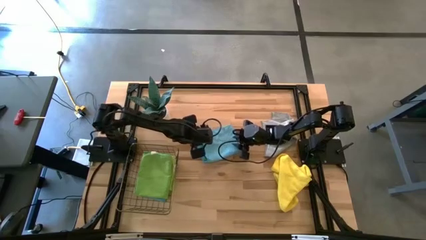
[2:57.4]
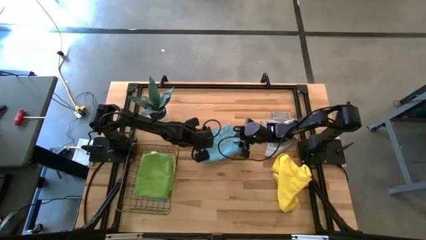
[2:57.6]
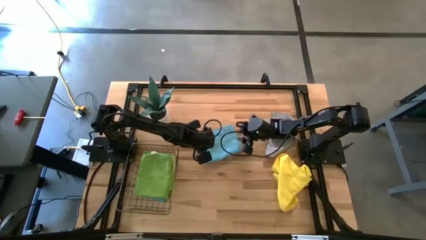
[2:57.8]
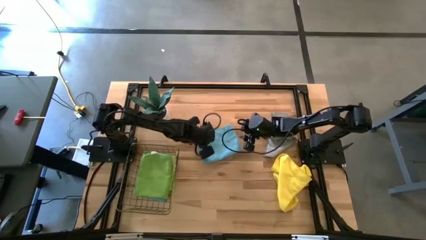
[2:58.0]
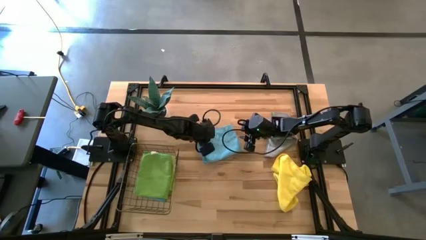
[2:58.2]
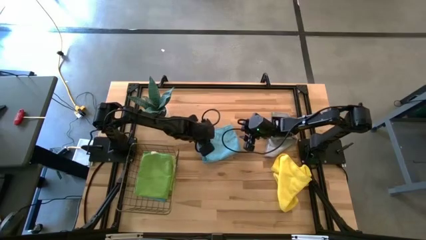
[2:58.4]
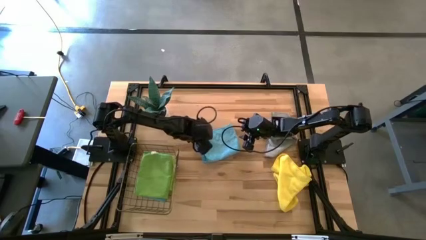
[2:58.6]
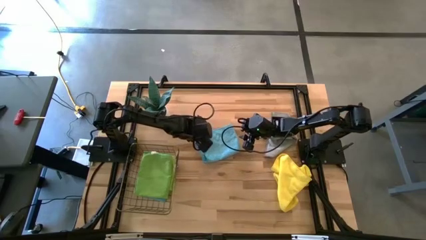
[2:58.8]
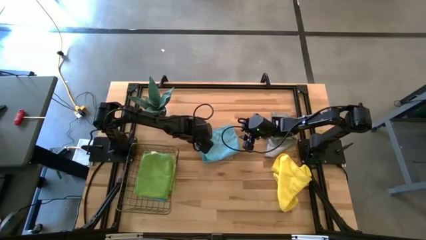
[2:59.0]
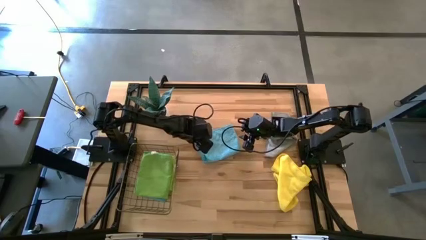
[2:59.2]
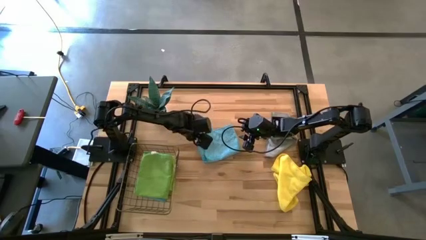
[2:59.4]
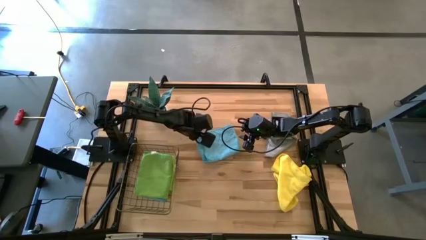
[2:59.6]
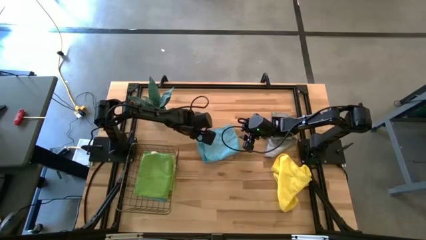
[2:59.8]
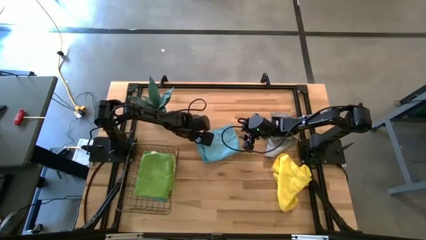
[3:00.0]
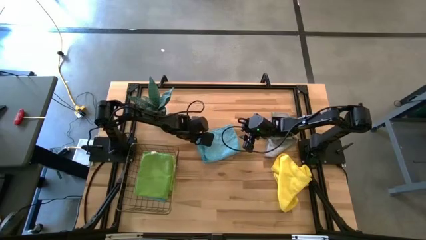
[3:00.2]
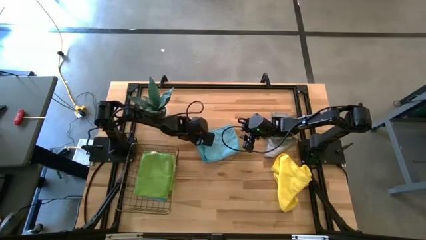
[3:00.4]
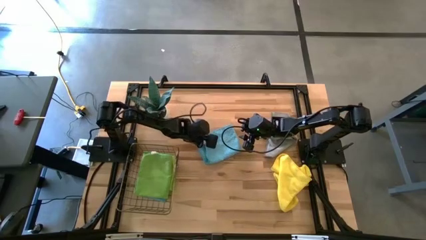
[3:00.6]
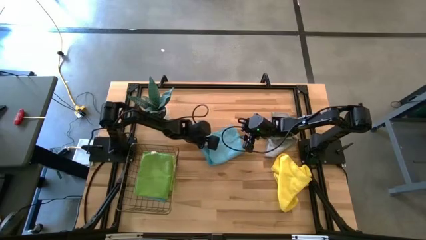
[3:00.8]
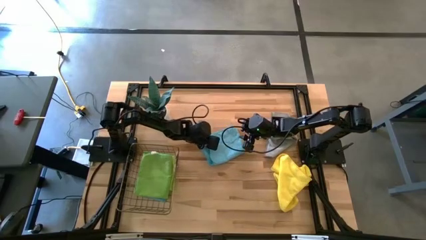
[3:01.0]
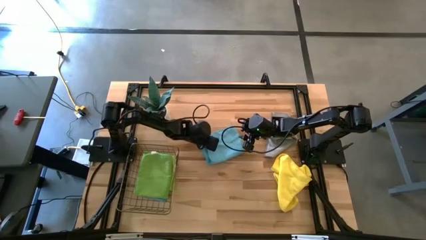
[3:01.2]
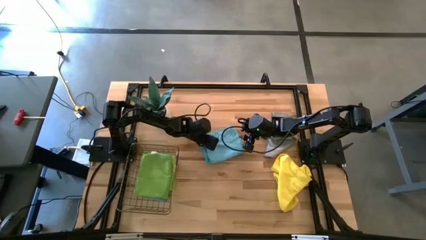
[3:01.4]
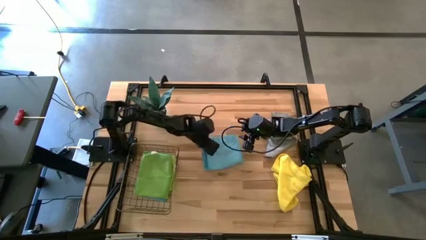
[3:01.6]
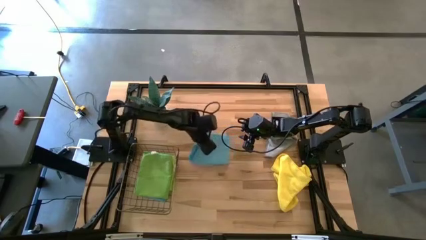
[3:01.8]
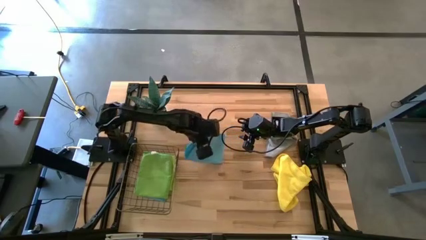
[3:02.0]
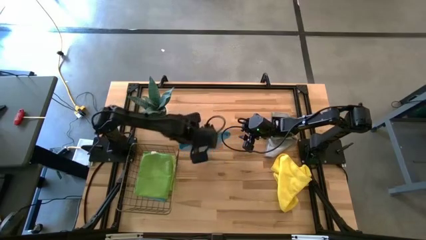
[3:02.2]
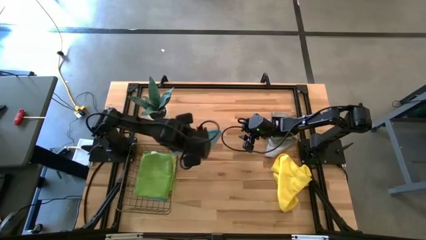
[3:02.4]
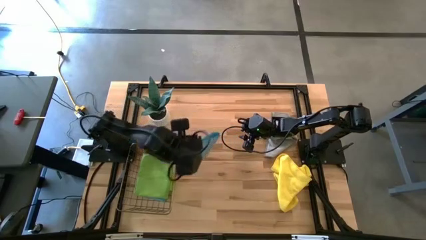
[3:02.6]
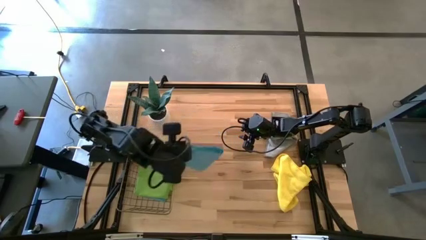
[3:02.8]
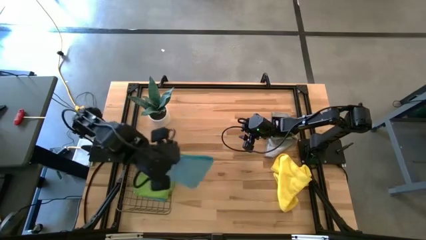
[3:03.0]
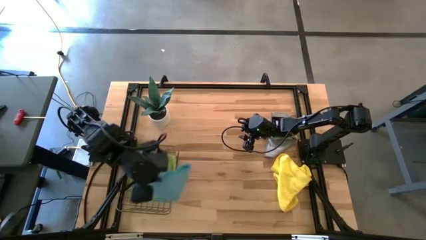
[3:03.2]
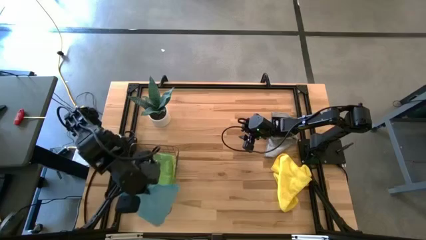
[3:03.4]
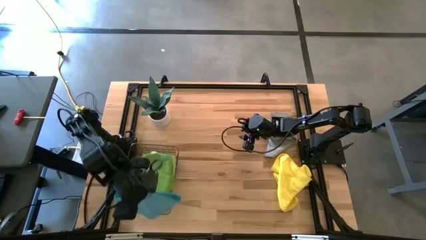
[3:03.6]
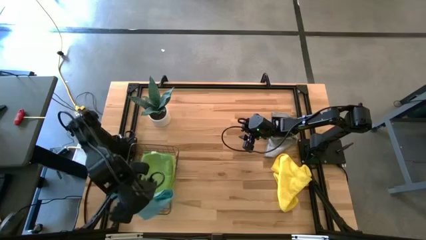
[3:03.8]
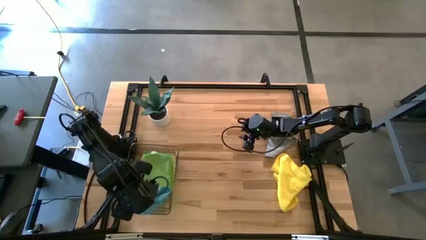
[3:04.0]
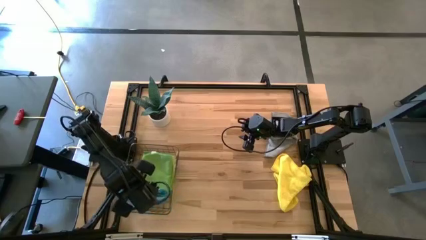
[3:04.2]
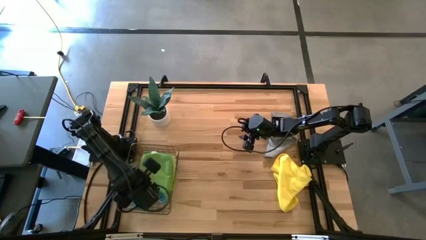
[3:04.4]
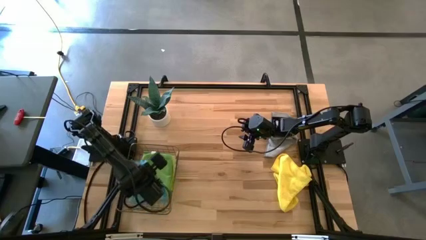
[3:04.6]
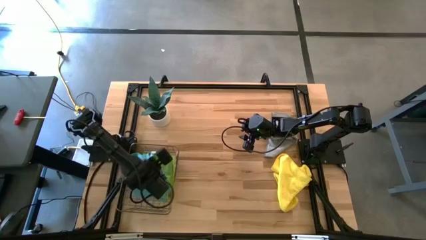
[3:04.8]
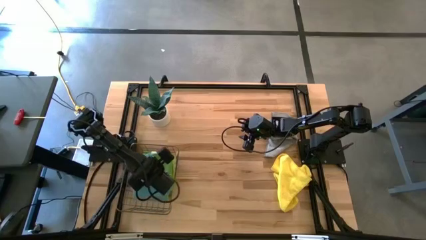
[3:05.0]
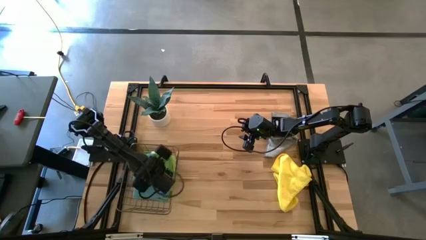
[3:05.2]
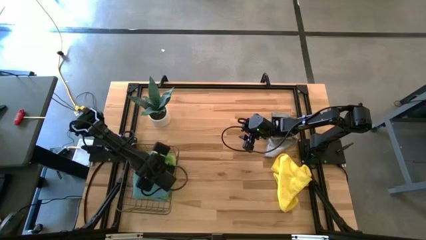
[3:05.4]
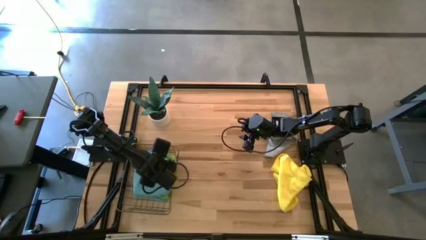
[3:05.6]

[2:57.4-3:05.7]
Task: Fold microfiber towels
Put the blue microfiber towel into the wire basket

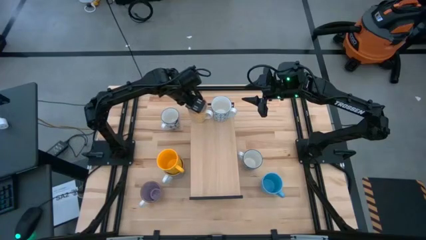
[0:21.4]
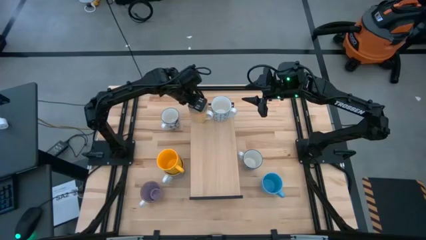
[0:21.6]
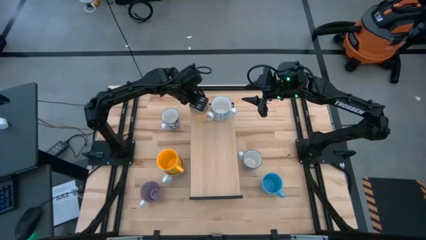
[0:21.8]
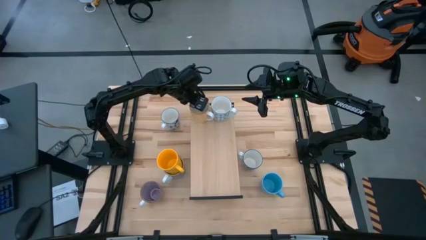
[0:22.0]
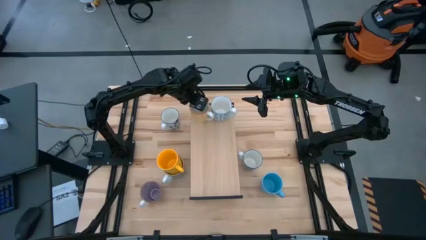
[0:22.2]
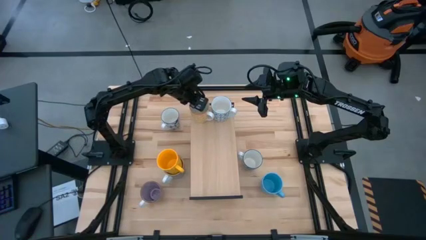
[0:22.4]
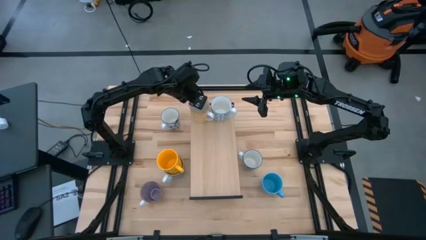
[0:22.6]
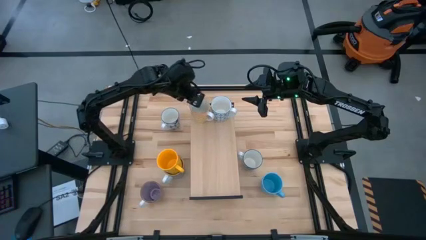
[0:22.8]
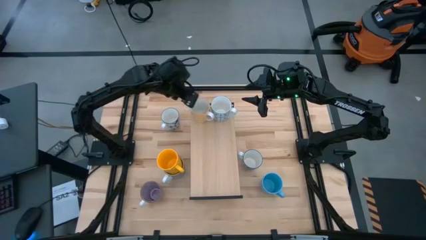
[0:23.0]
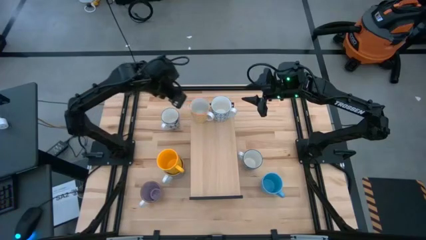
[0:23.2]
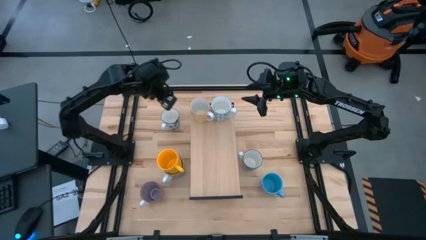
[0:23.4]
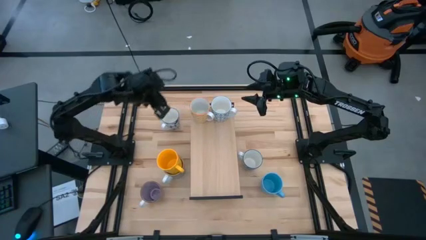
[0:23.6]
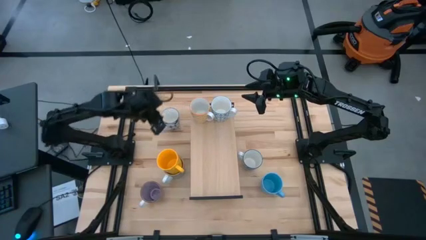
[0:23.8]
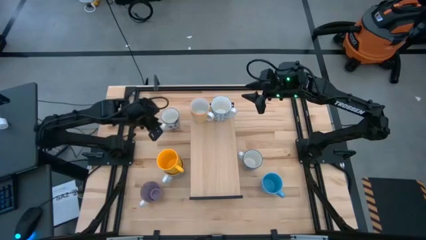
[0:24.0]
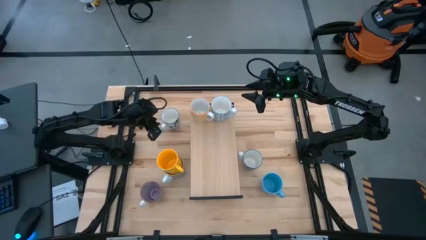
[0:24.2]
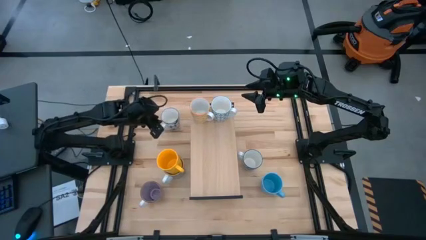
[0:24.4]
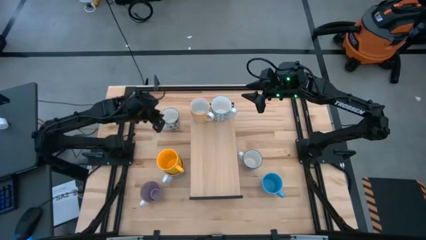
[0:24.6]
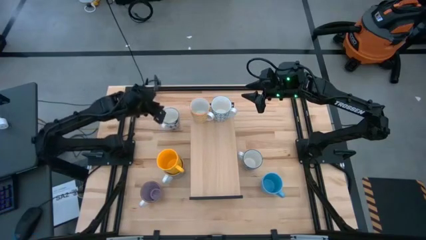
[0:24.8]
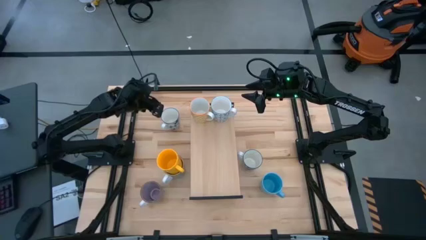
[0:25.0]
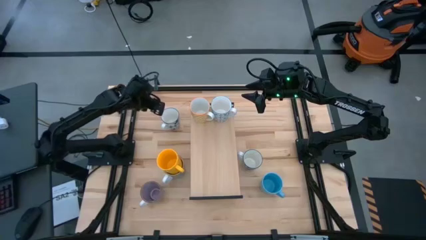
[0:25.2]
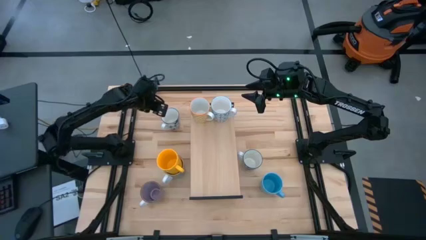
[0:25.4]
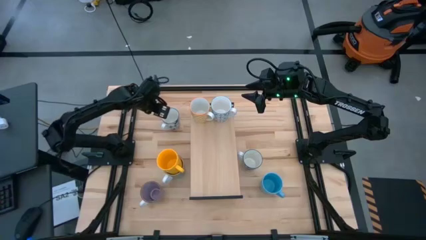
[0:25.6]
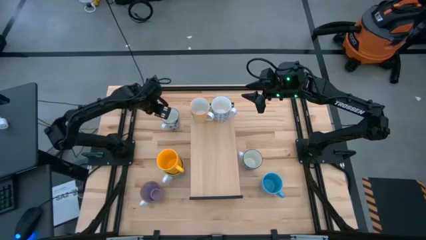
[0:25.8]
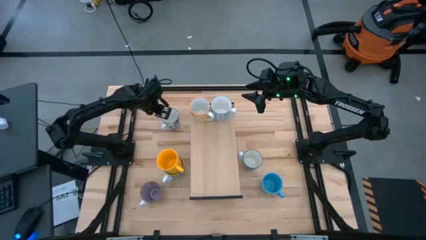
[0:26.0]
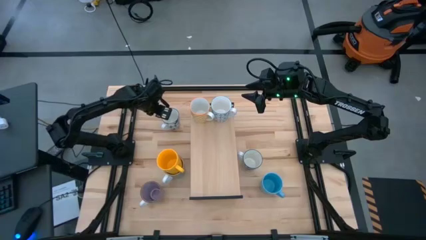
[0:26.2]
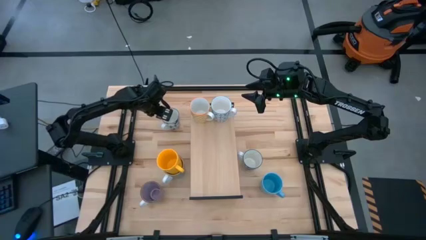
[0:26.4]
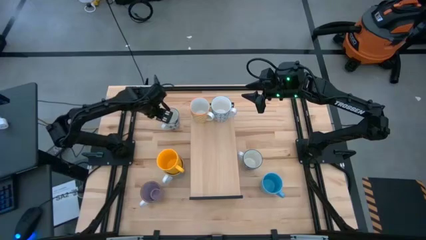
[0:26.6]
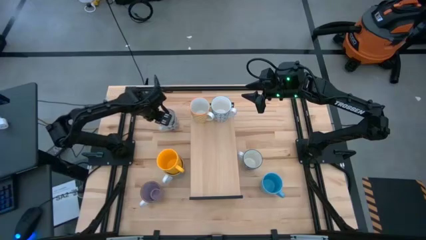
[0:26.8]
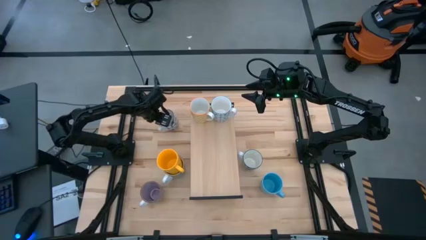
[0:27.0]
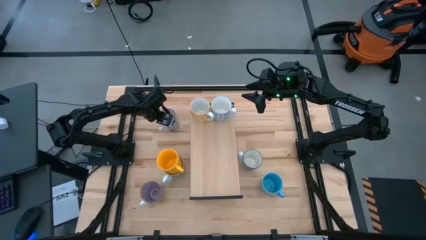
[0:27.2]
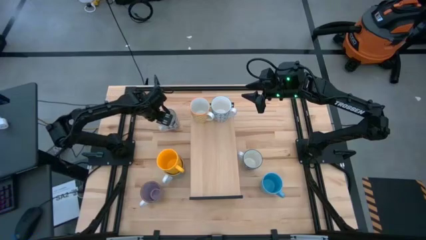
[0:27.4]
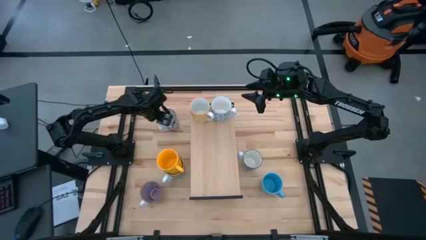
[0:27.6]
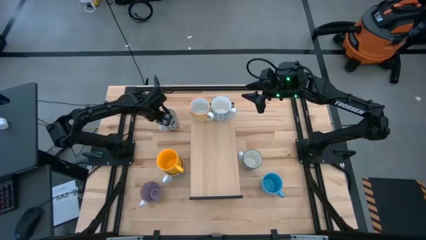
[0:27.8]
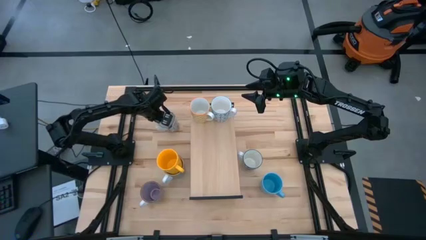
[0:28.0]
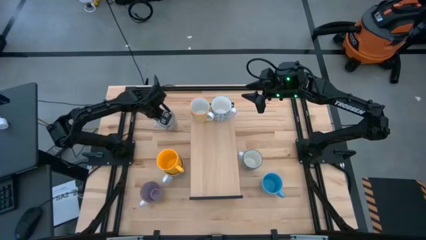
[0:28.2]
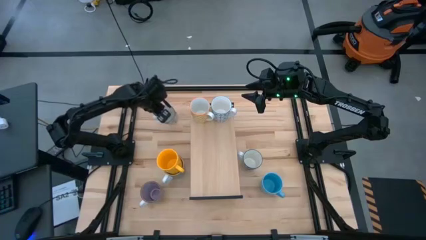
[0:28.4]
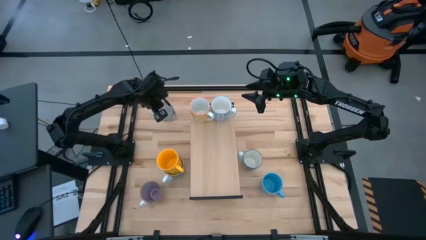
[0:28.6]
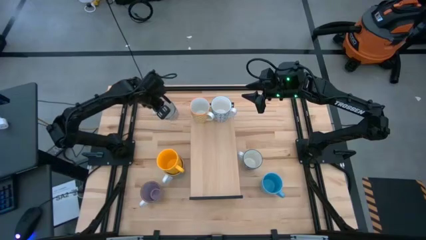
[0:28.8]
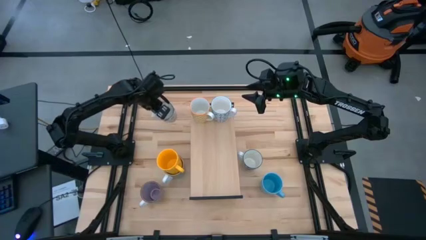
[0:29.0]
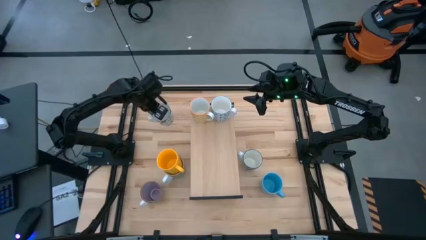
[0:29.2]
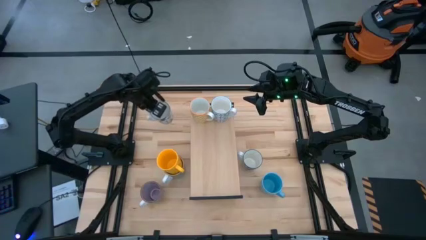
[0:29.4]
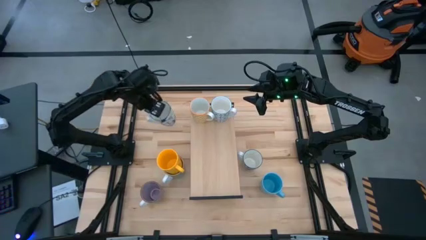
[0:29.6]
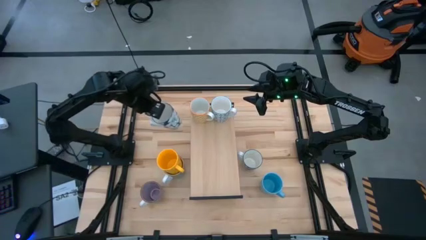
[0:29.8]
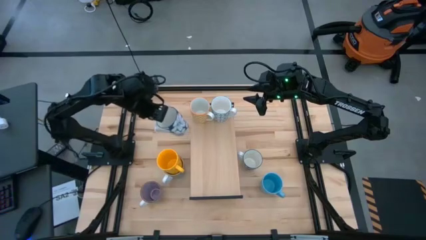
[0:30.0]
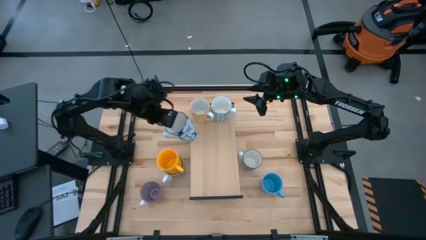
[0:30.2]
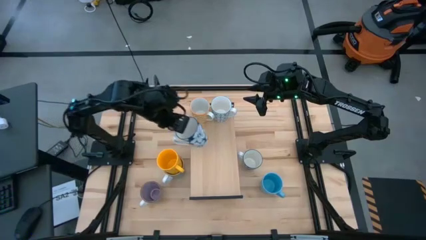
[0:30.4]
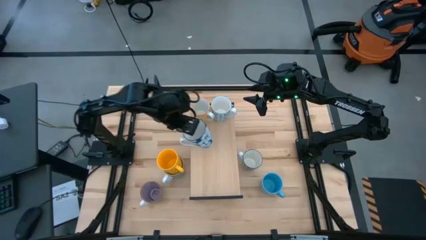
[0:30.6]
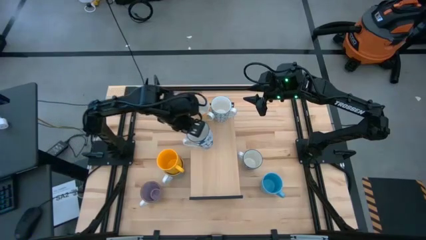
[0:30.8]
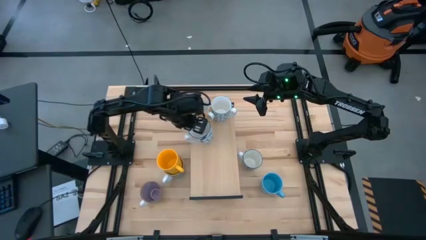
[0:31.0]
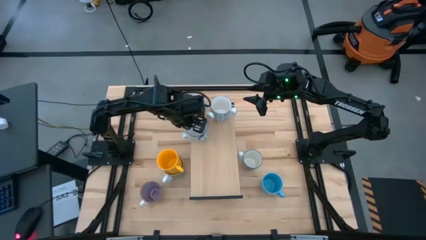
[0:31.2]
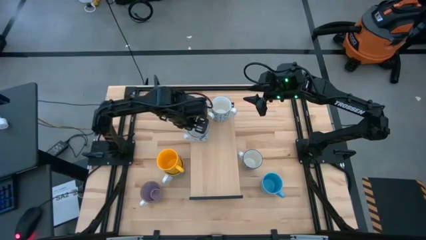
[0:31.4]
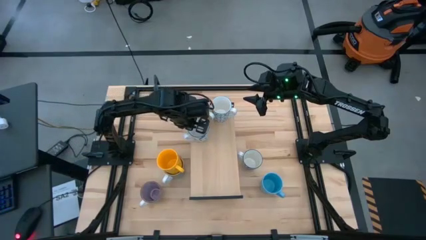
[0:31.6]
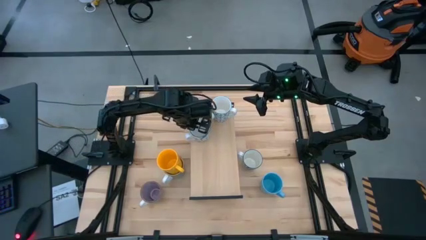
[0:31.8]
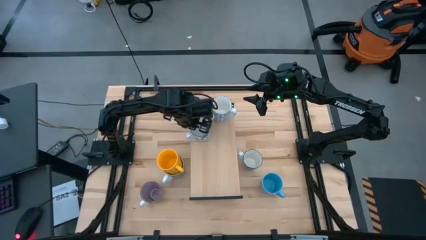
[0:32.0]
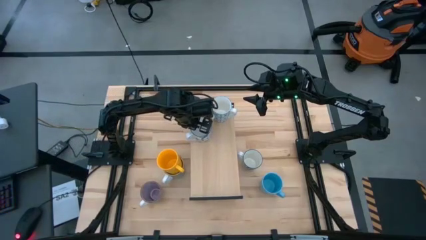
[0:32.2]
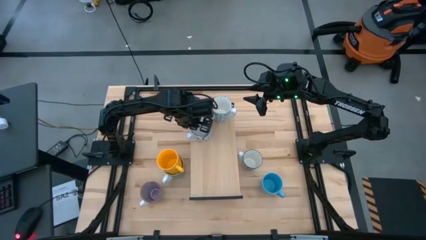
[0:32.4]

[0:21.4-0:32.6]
Task: Place coffee mugs
Put the right white and blue mug on the shelf
